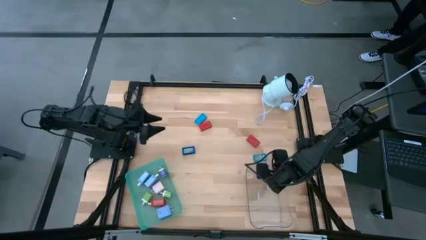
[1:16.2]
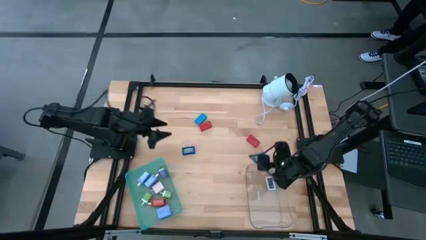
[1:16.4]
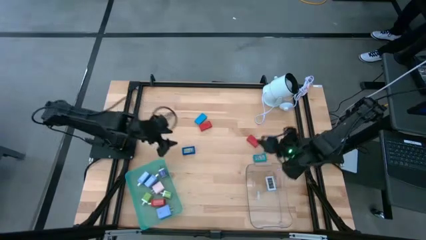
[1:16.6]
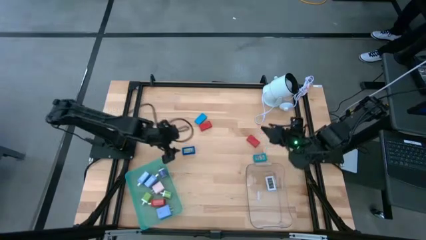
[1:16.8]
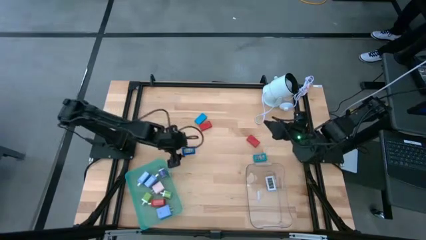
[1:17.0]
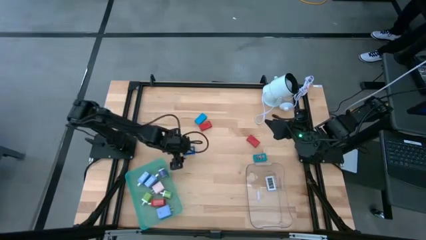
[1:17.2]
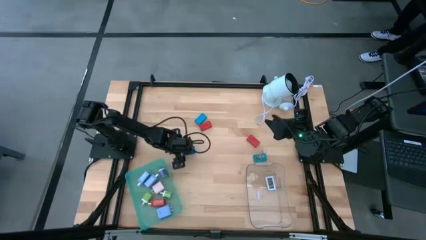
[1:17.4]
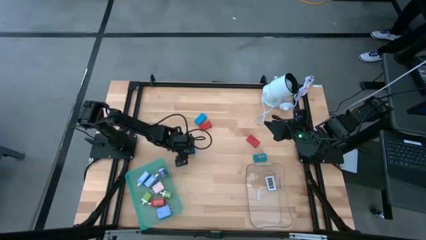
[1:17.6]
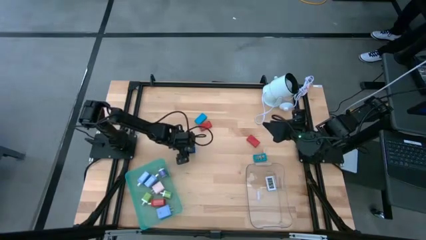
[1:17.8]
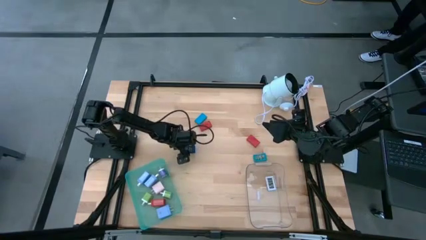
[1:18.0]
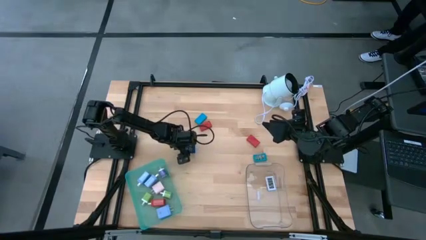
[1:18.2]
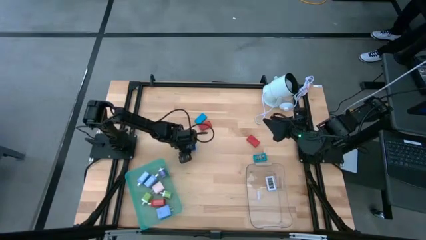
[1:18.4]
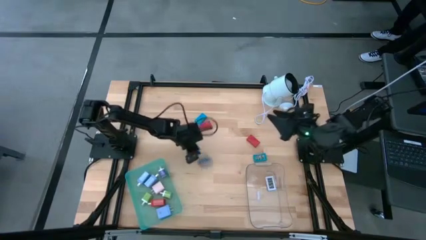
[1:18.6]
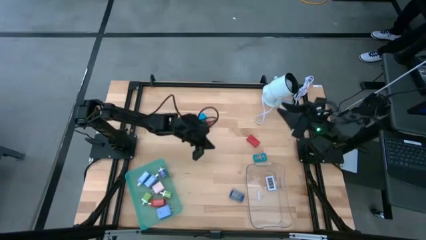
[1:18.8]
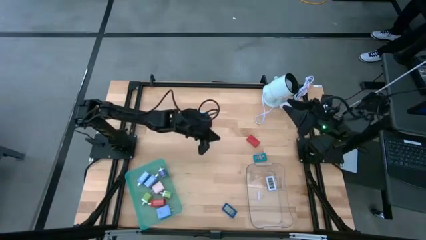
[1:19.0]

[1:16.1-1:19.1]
Task: Pick & Place Office items
Put the blue digital clock into the transparent bin

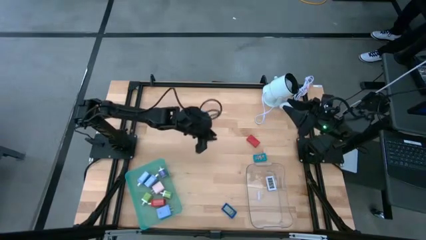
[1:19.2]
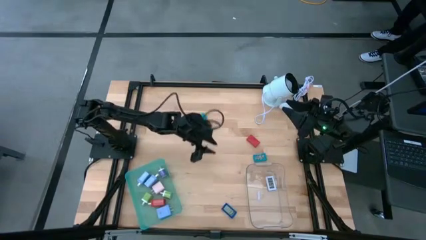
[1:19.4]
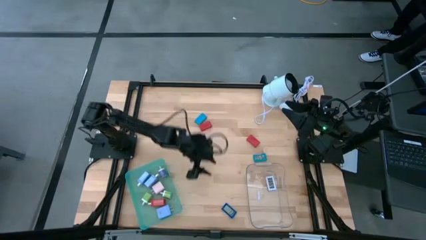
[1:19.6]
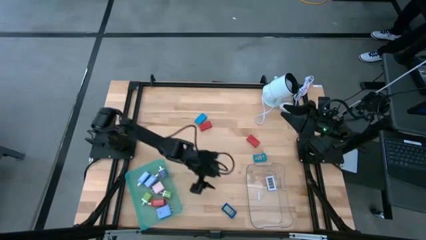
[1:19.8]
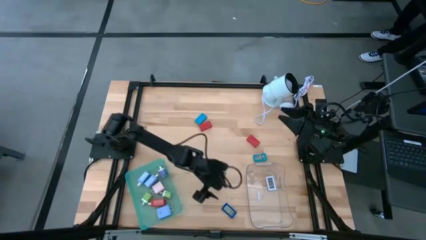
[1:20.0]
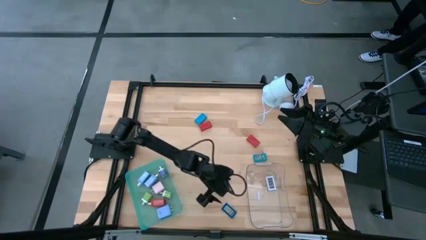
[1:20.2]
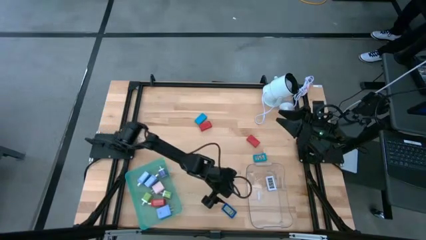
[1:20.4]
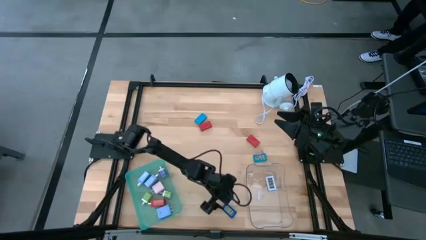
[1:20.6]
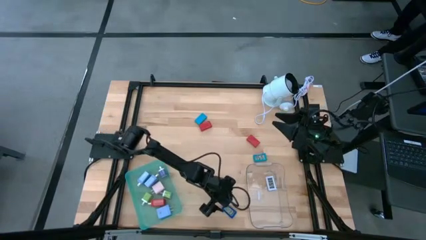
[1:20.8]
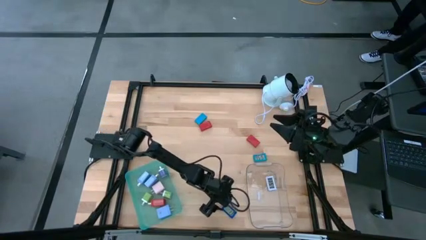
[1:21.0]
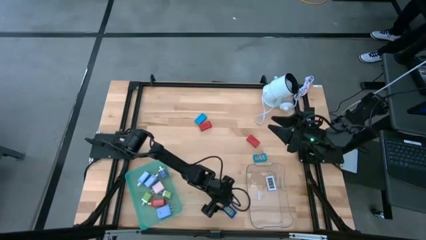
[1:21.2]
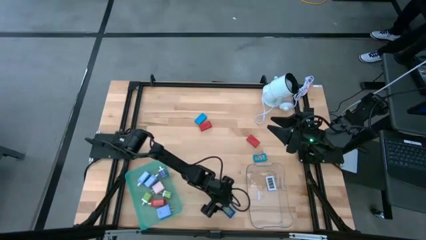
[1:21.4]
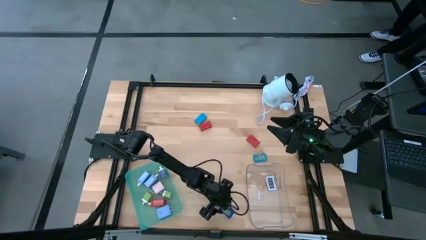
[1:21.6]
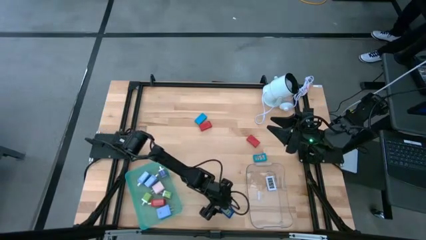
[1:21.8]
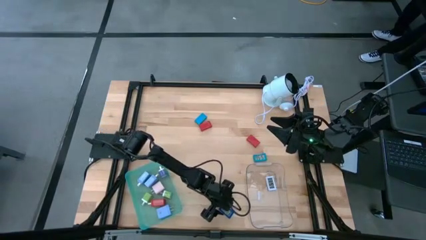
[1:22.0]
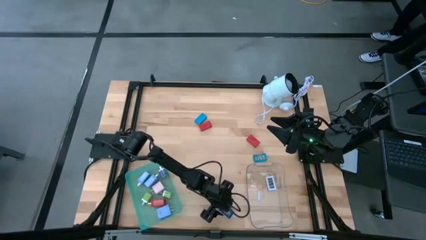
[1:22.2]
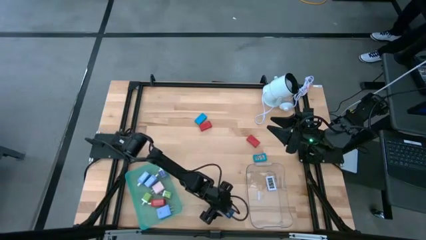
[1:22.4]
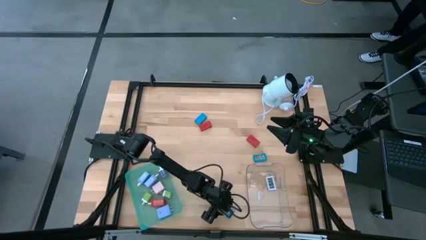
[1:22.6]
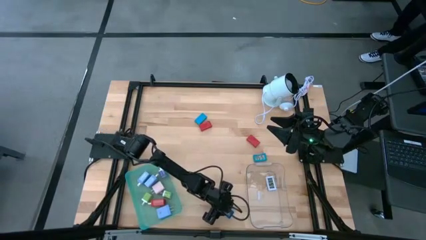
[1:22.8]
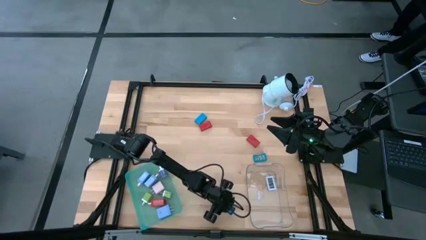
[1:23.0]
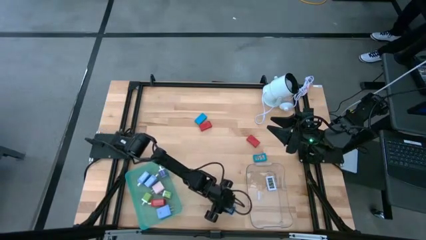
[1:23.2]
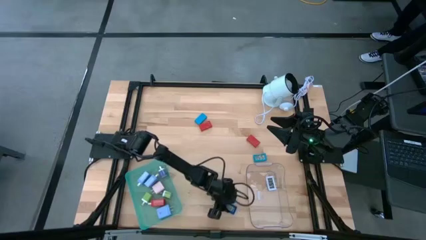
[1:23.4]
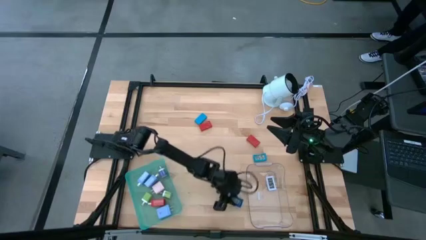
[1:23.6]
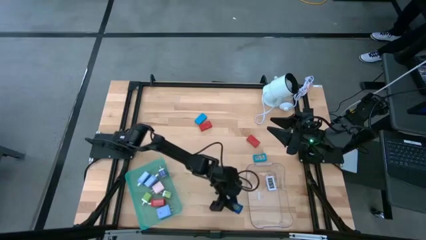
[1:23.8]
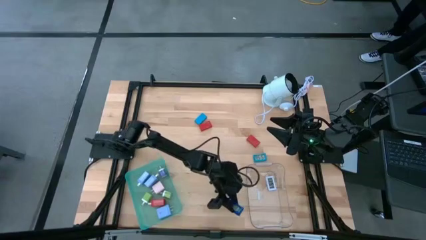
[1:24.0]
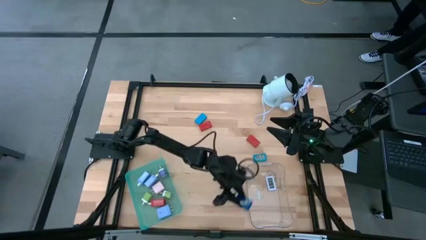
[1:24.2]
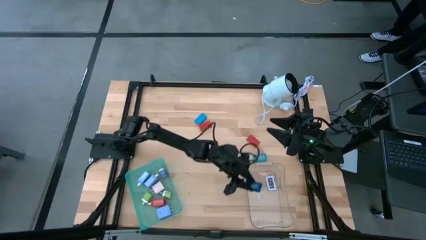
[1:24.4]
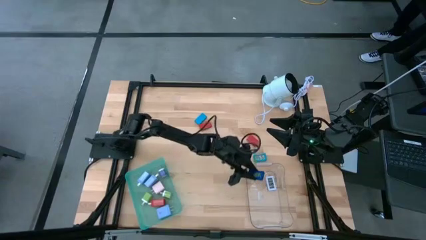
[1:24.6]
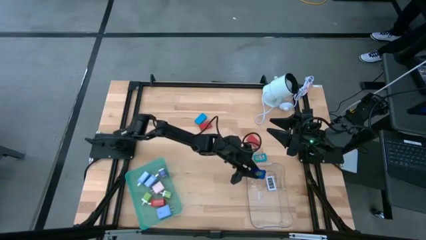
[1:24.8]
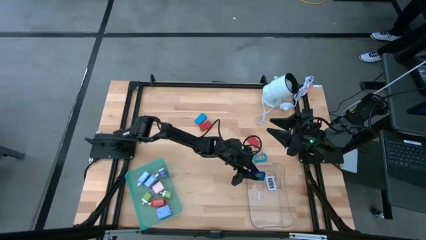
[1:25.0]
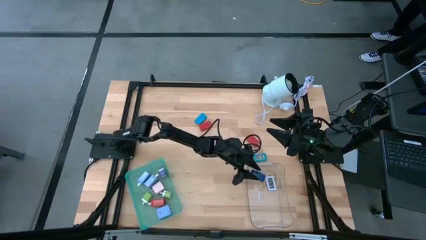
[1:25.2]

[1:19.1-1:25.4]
Put the blue digital clock into the transparent bin

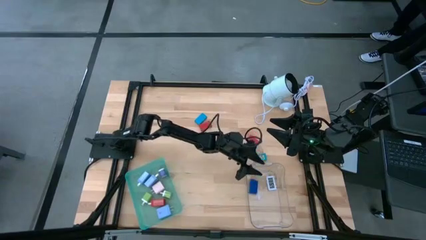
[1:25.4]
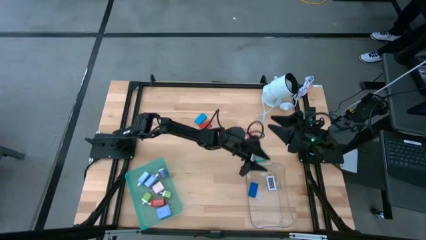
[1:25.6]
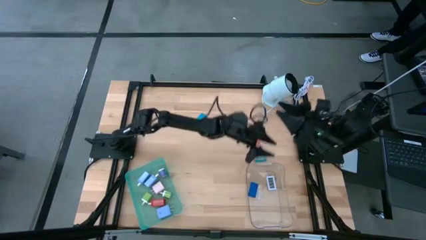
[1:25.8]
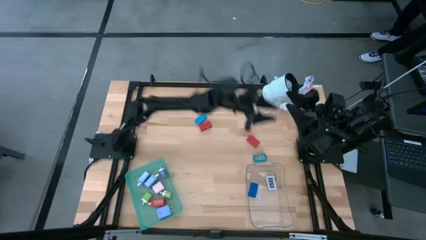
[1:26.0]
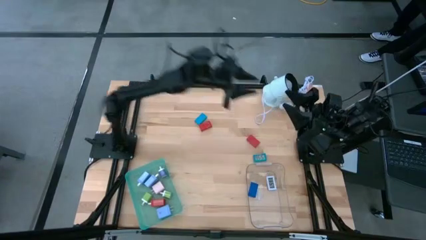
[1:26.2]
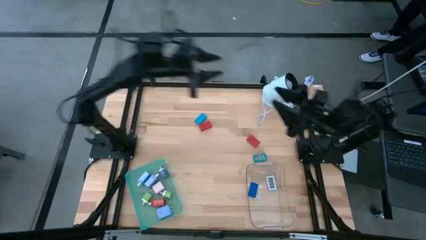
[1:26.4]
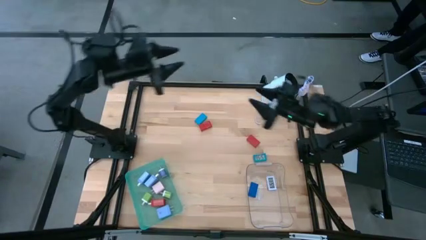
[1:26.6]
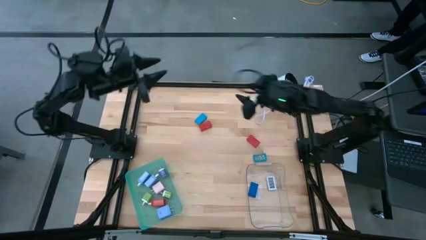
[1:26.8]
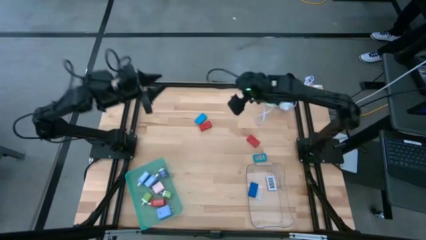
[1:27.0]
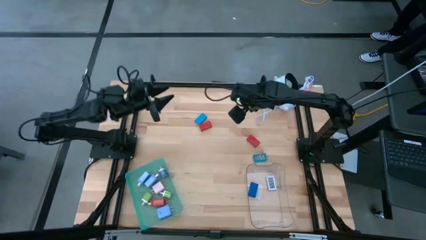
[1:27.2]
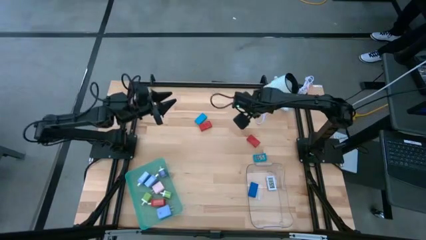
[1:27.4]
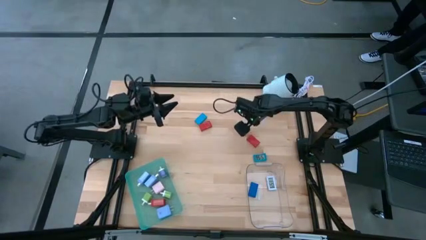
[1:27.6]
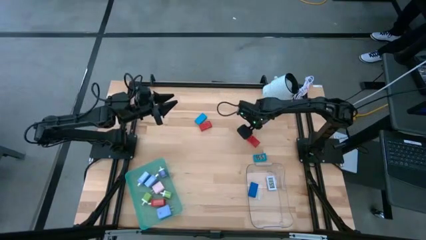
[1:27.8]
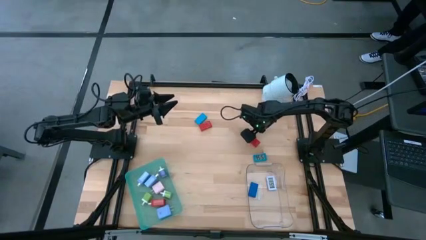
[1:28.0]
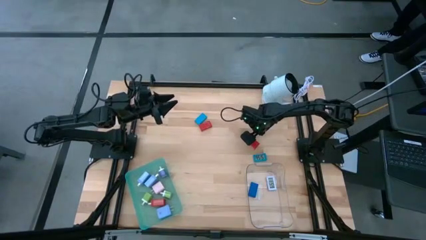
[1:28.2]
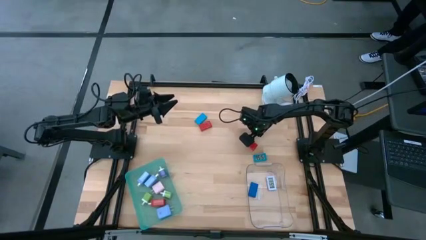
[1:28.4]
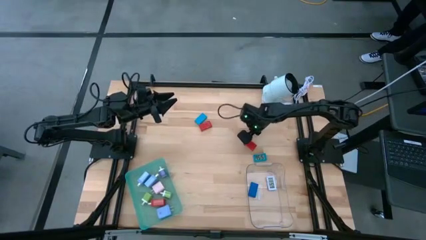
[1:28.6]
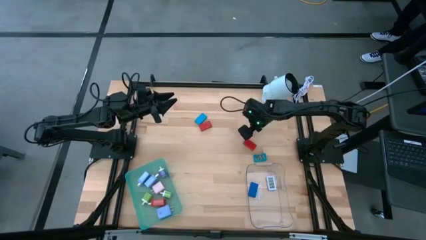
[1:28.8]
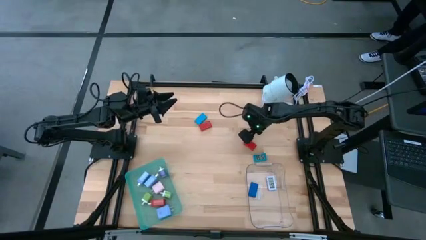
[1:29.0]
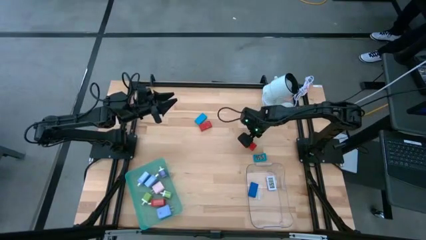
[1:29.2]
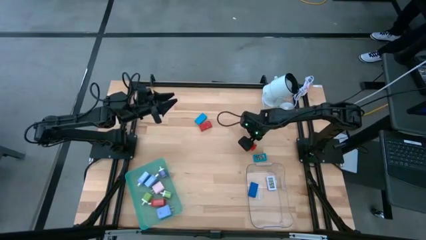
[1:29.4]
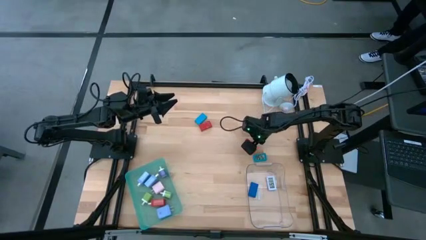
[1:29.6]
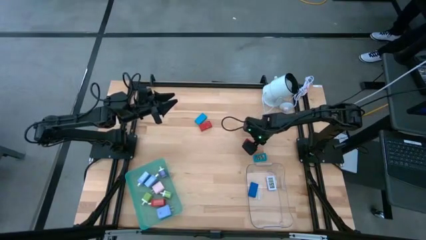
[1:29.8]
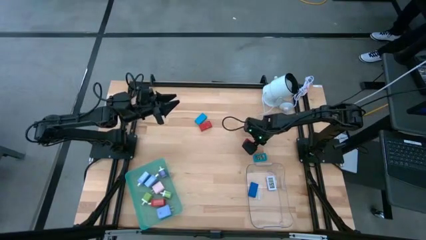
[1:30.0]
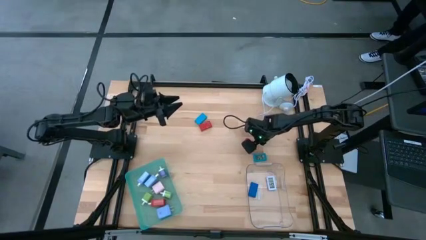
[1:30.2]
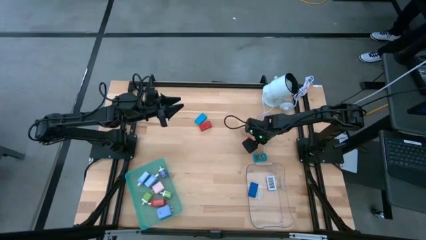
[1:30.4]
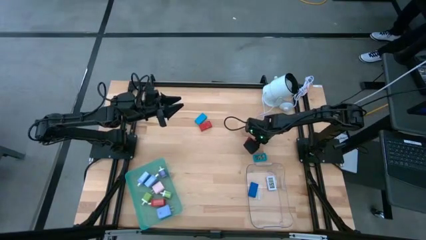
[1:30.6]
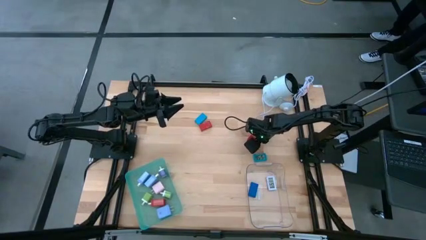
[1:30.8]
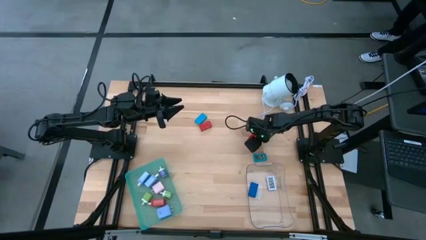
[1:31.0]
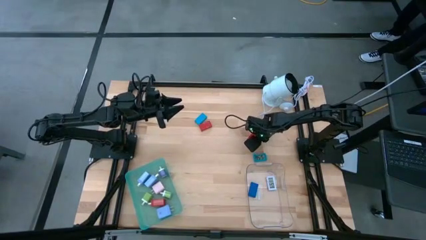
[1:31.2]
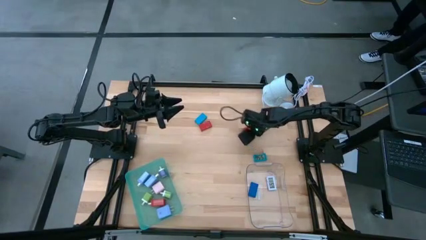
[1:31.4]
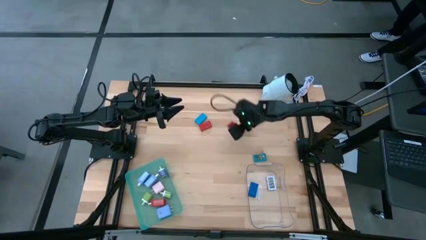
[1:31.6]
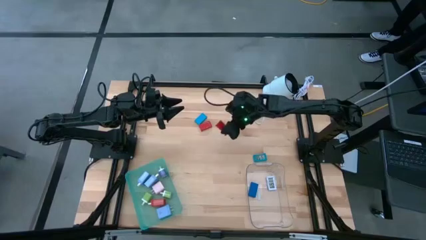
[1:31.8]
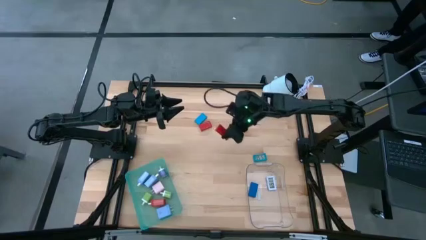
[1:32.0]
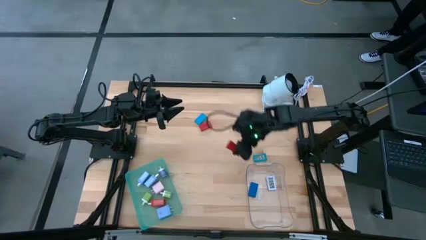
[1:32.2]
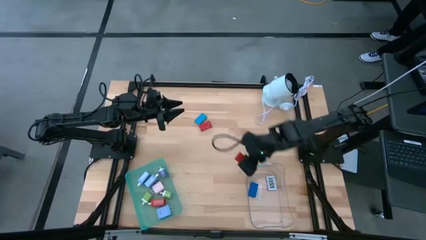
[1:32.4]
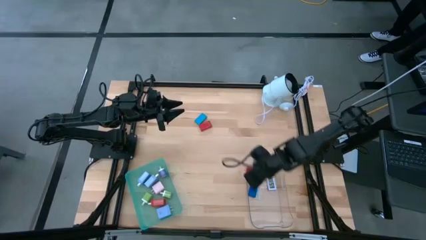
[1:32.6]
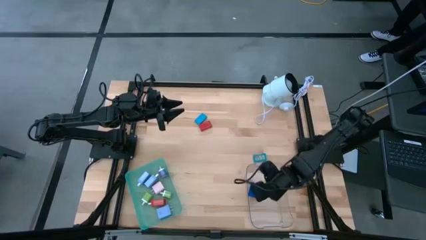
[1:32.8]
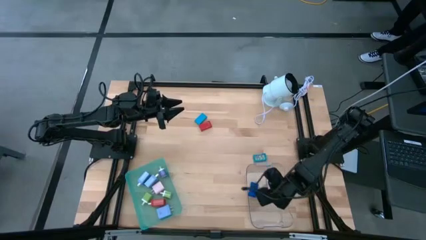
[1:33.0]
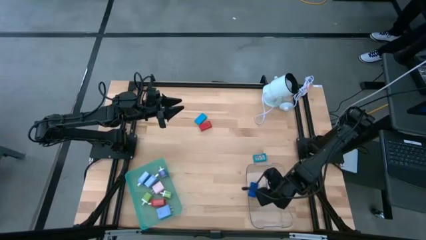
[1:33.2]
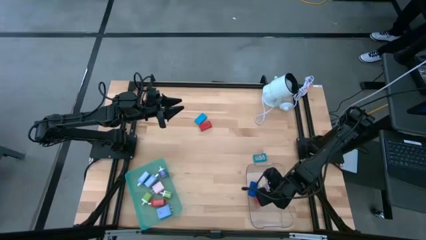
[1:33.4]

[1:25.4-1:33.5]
Put the bottom red digital clock into the transparent bin
